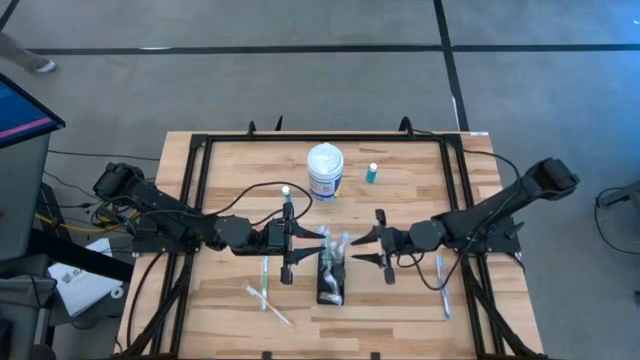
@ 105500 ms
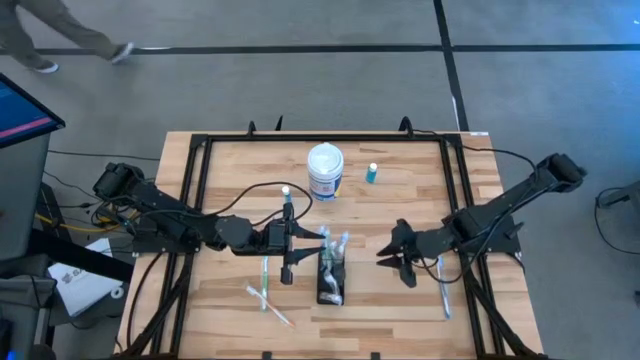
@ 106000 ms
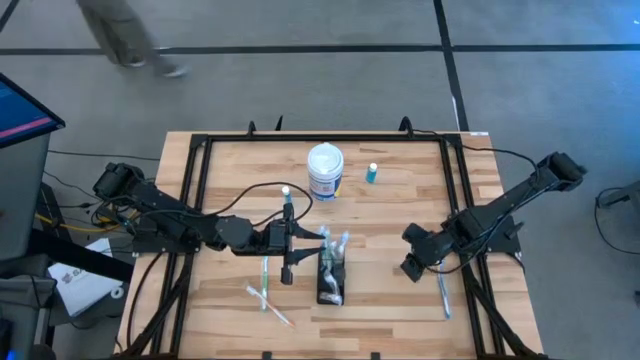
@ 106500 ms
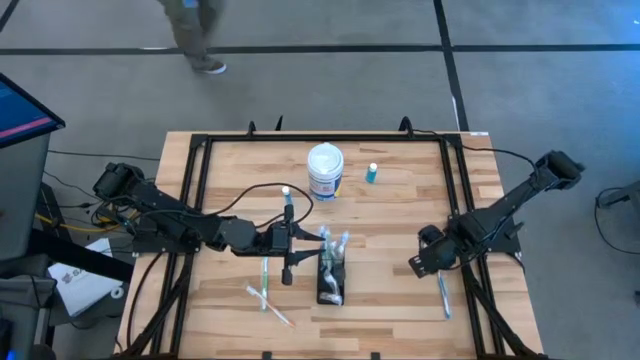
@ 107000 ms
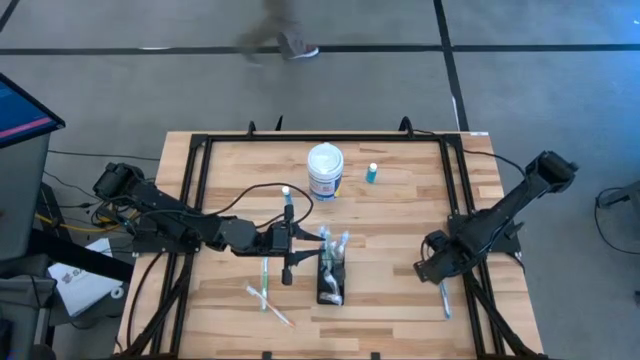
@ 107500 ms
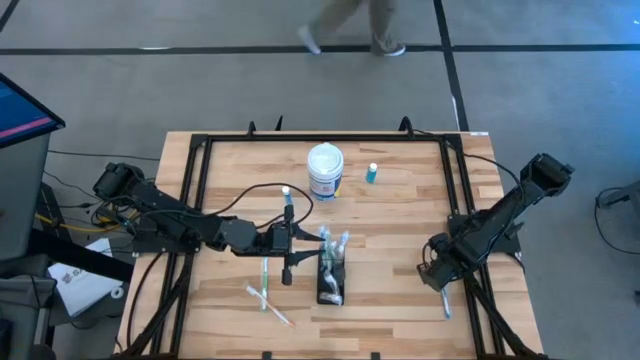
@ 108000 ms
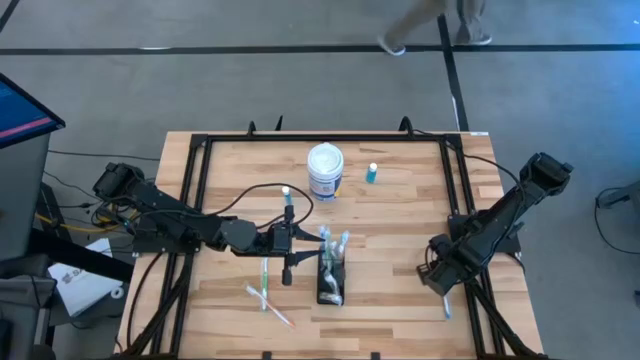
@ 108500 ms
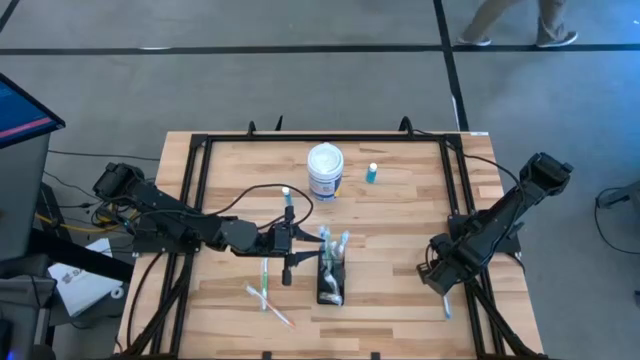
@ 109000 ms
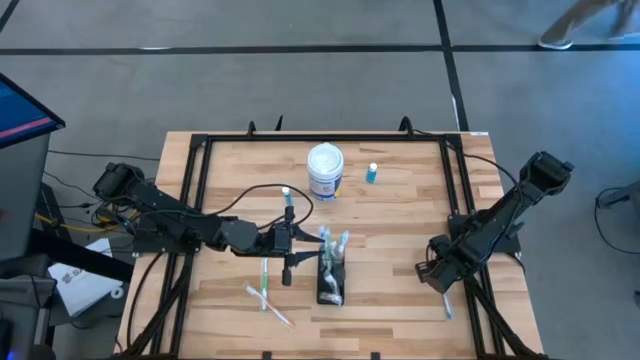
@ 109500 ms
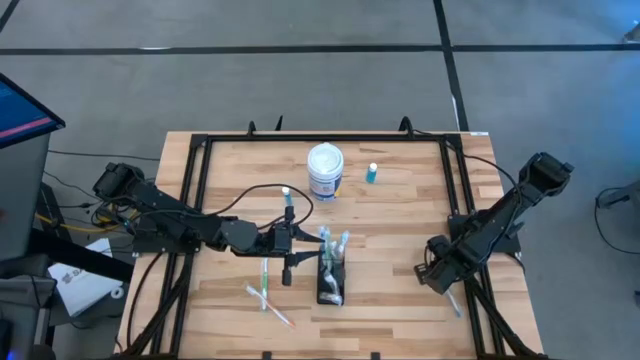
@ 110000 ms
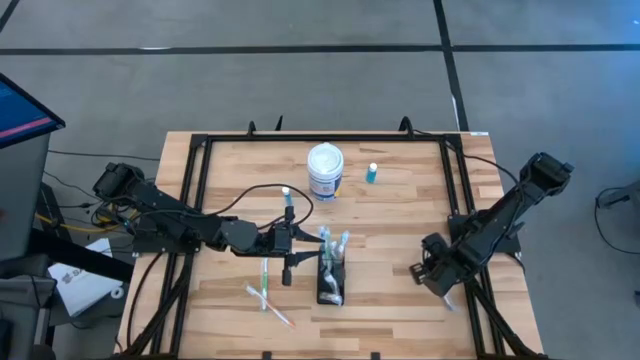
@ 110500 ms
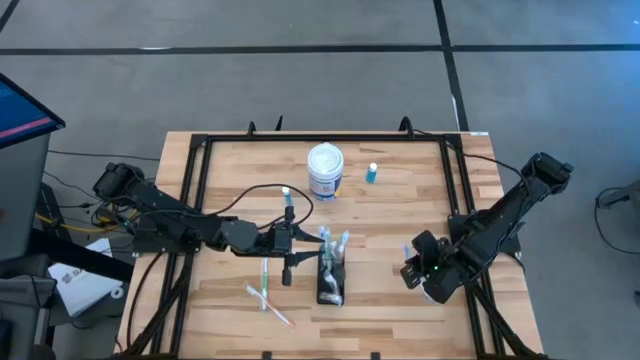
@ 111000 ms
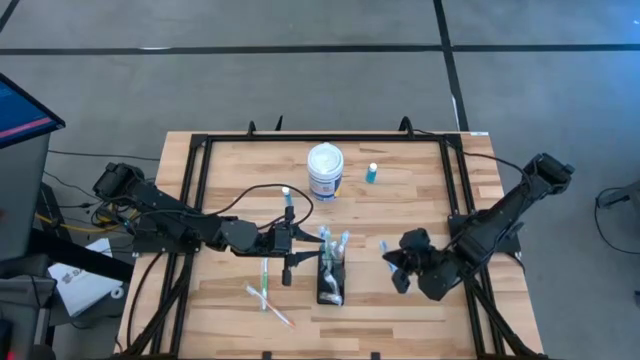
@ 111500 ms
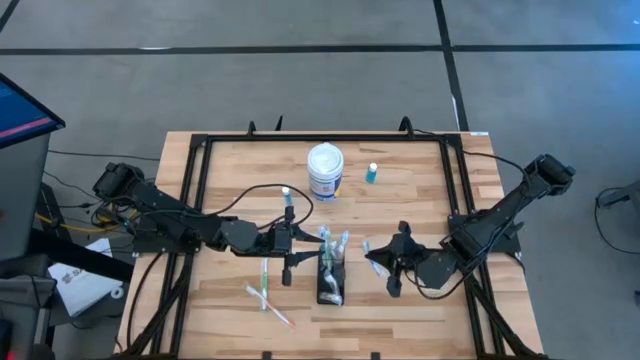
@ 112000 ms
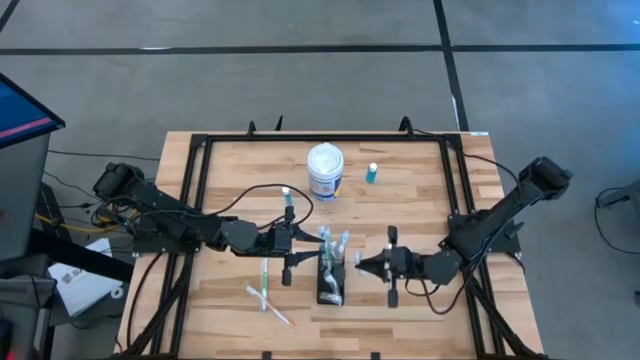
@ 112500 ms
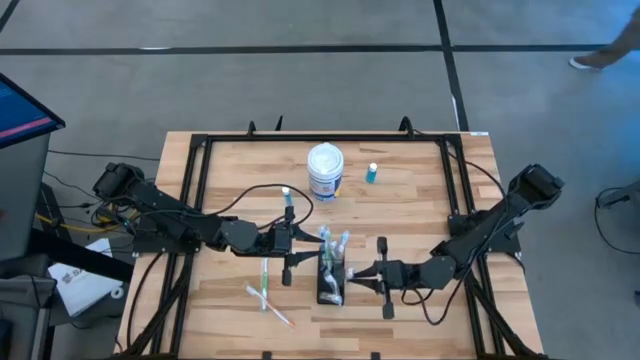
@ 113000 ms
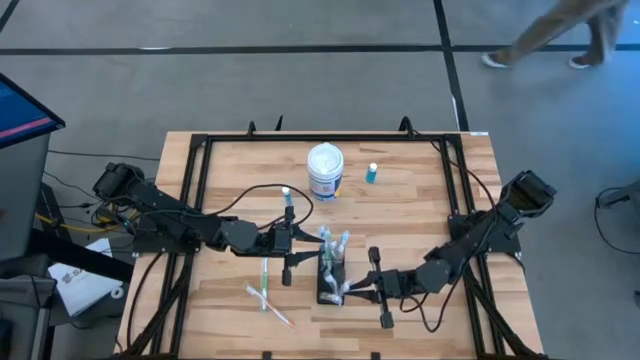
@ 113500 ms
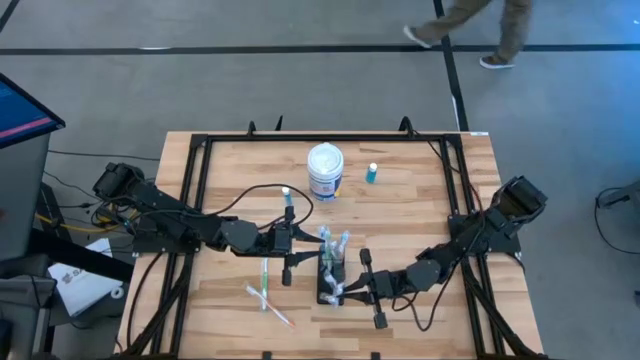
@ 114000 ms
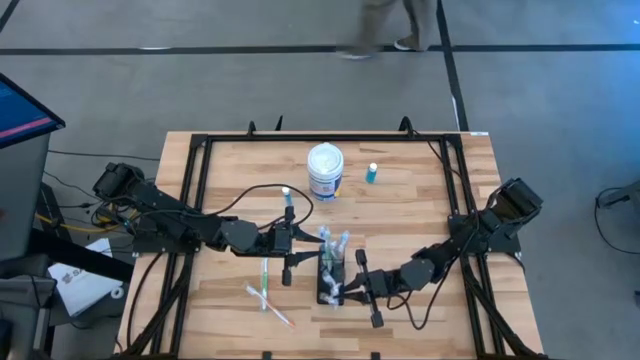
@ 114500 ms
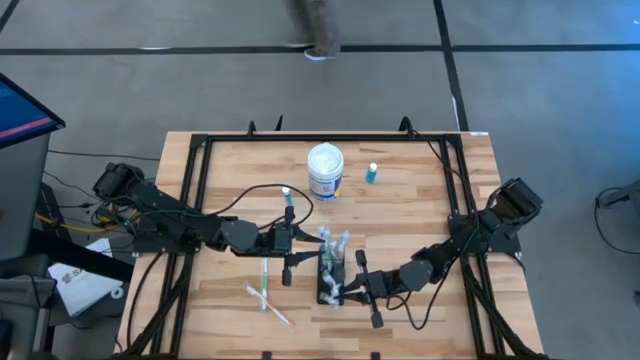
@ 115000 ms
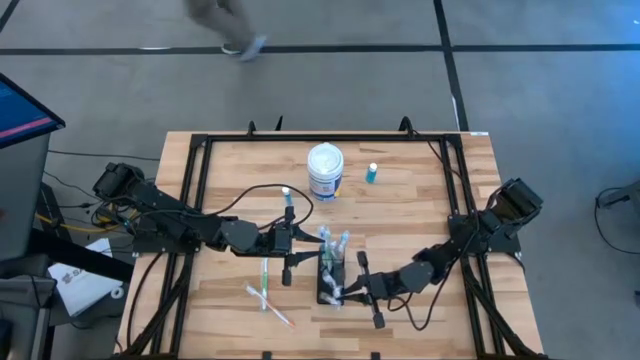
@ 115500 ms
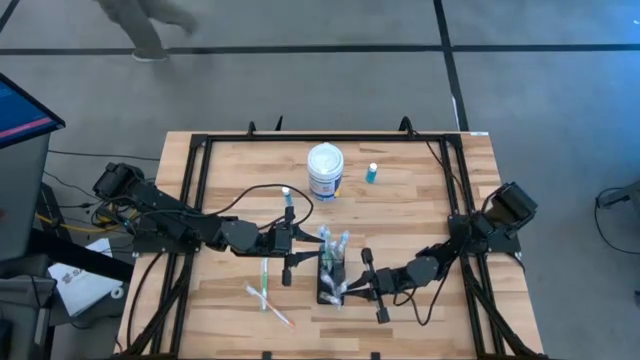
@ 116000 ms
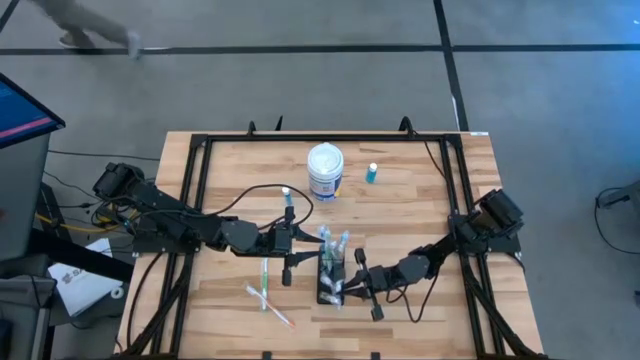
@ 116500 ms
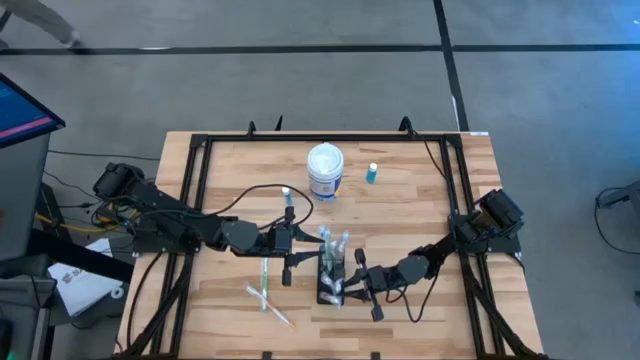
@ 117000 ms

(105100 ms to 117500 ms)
Task: Pick & Place toothbrushing station
Put the blue toothbrush into the black mesh organizer

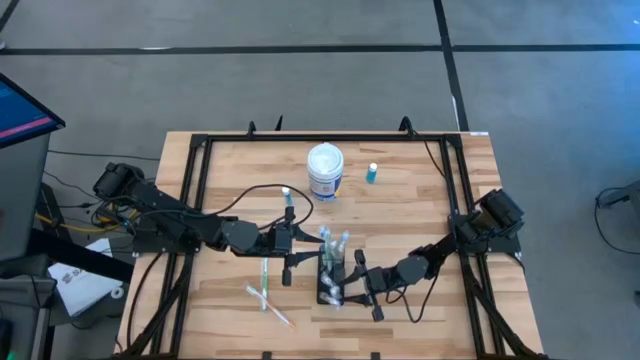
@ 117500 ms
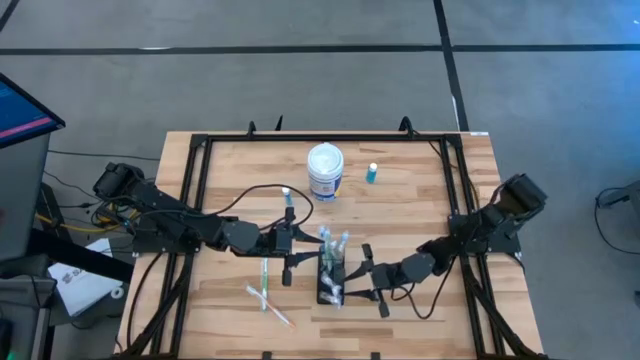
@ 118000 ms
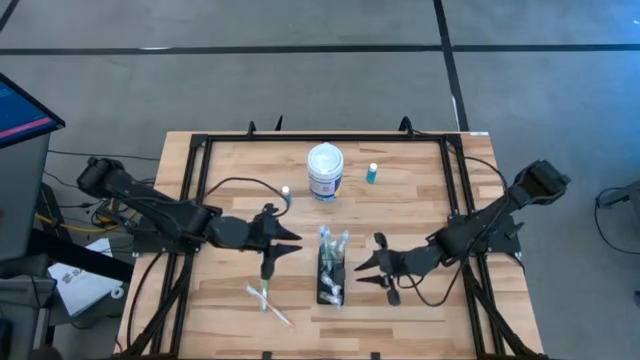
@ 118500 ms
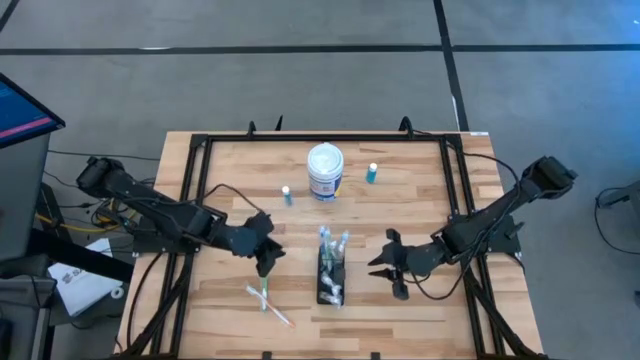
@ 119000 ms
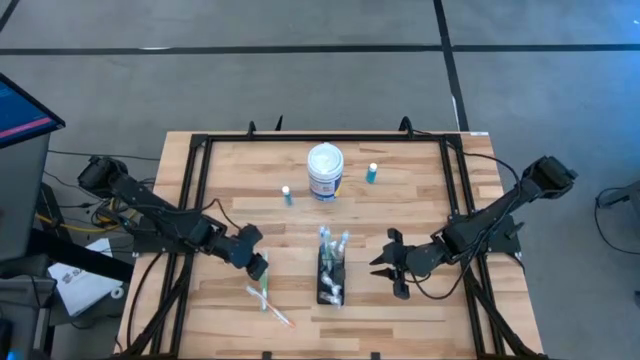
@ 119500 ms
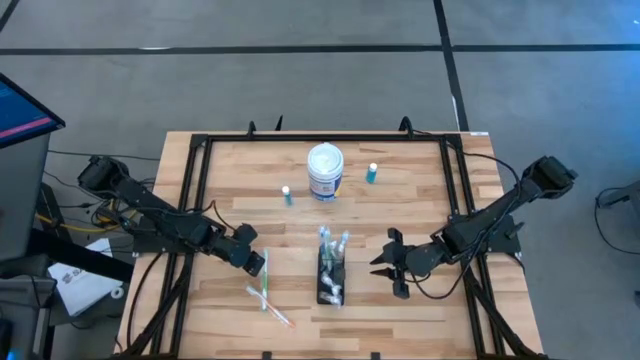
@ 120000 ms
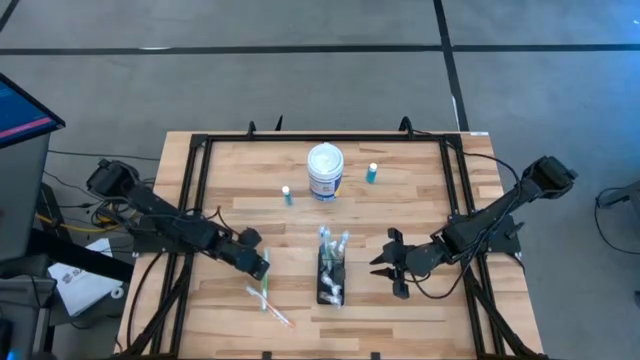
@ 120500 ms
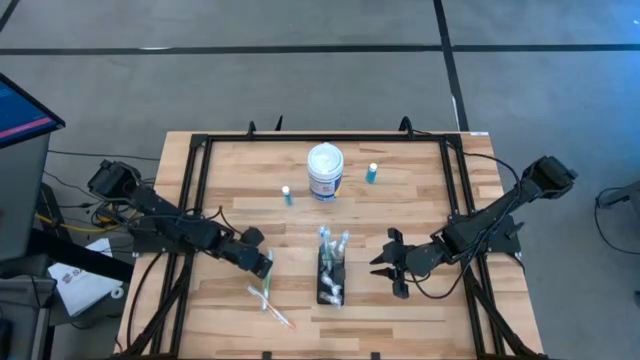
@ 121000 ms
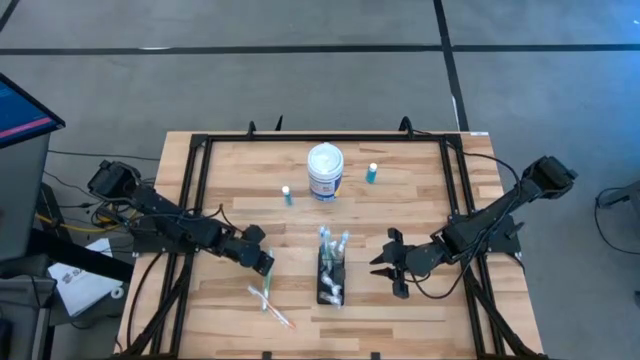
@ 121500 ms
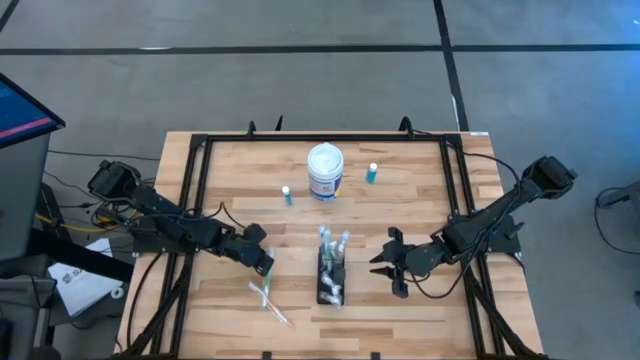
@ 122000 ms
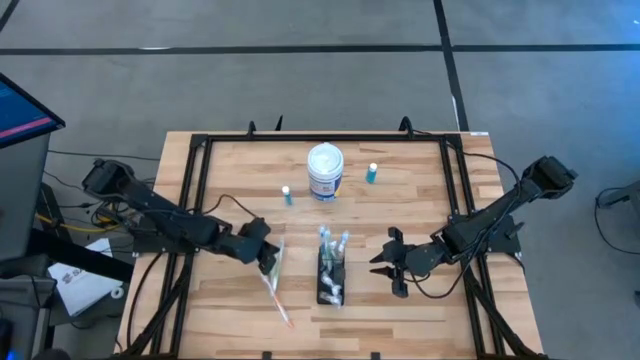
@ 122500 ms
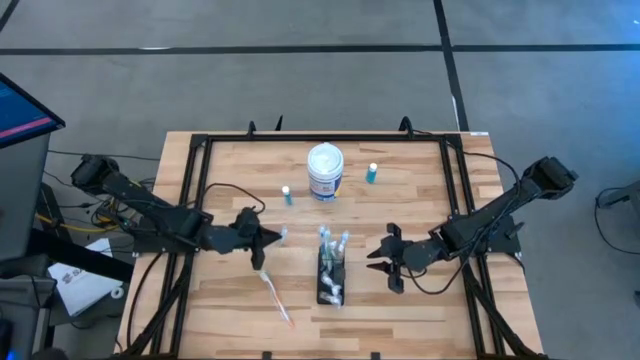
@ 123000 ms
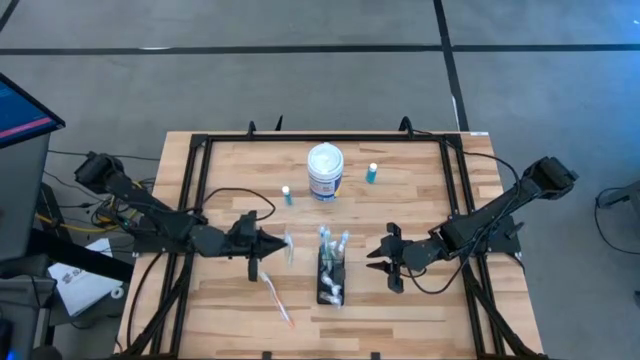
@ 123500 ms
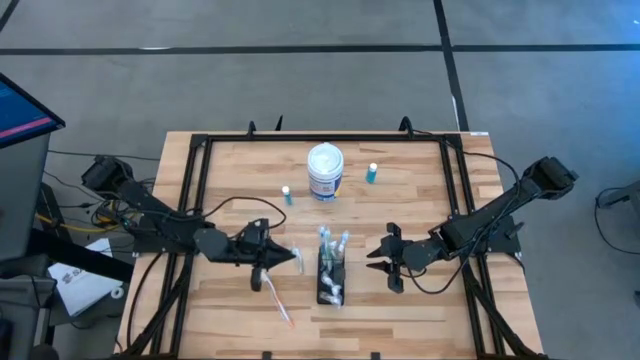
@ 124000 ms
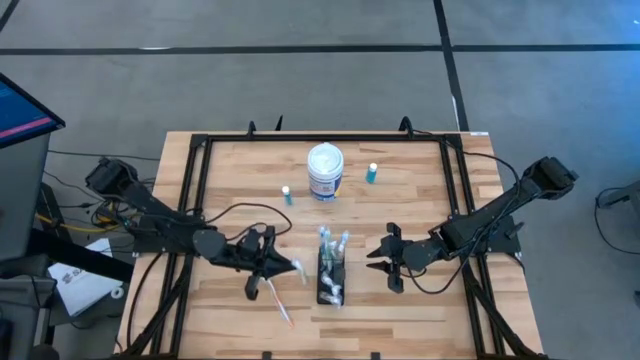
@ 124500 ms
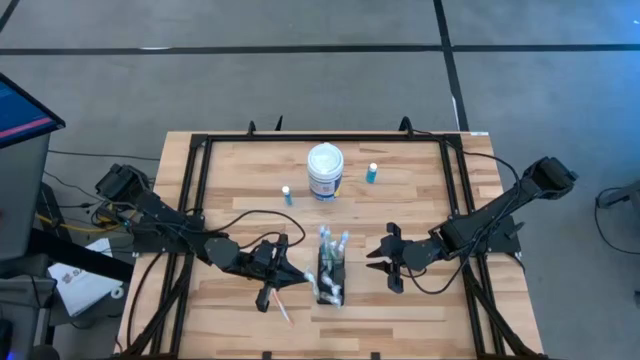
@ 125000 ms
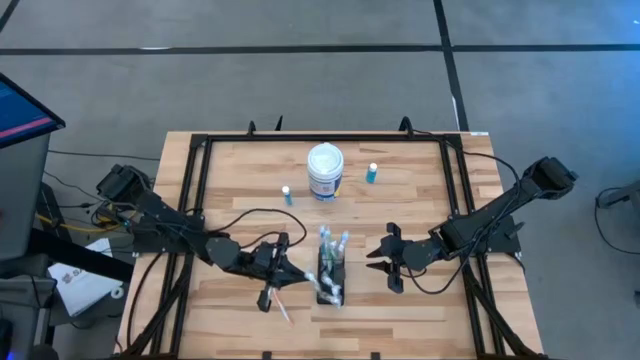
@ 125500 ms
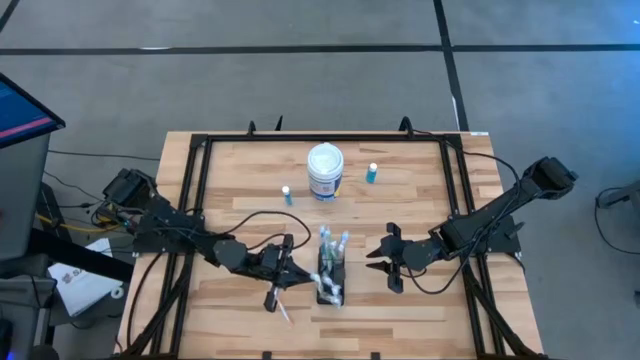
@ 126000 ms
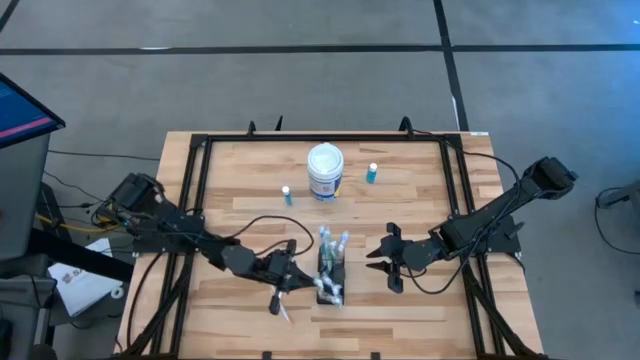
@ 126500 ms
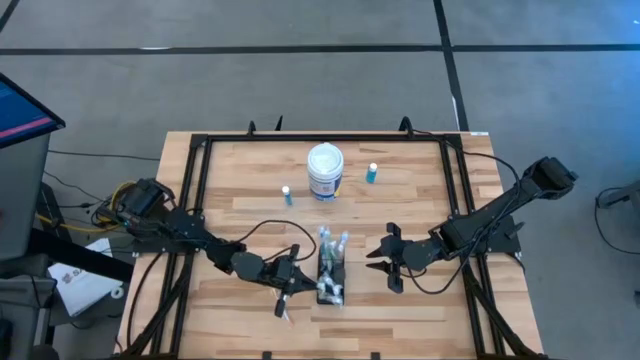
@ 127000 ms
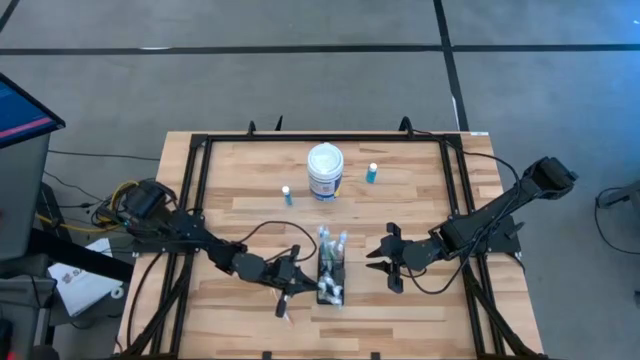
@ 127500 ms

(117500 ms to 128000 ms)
Put the green toothbrush into the black mesh organizer
